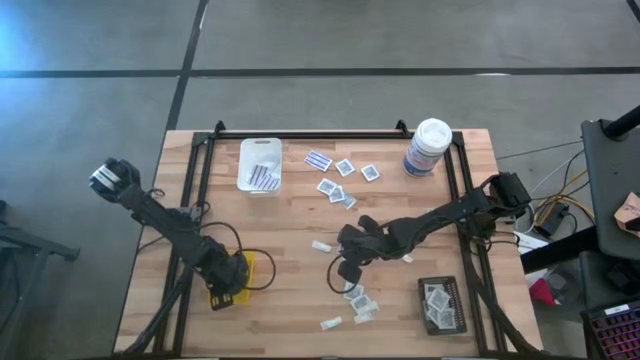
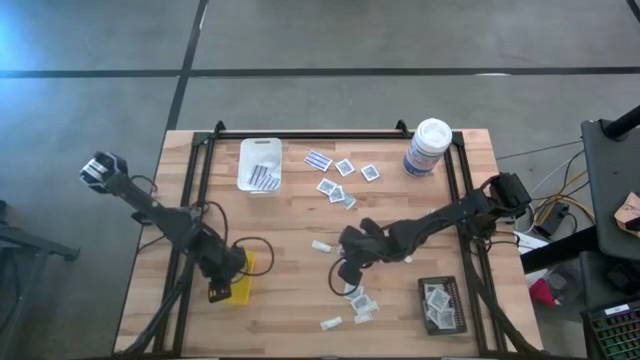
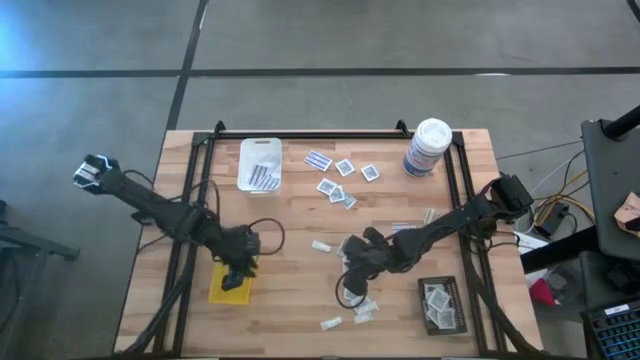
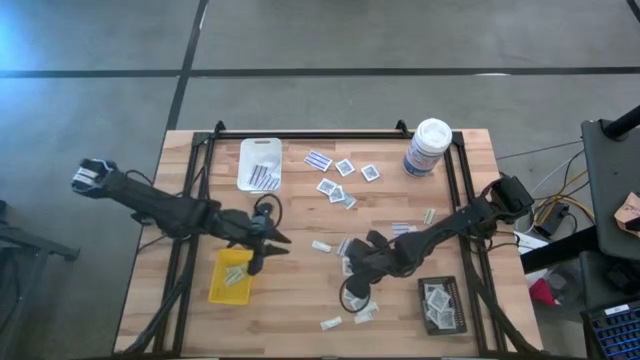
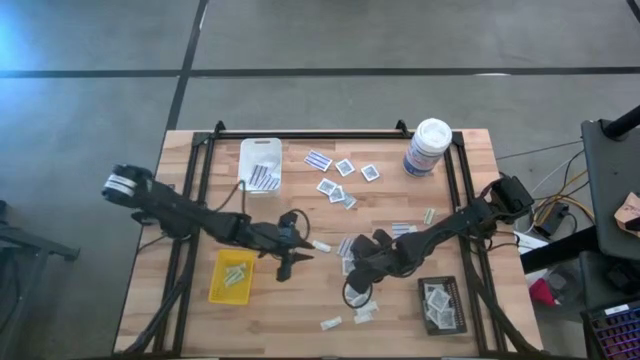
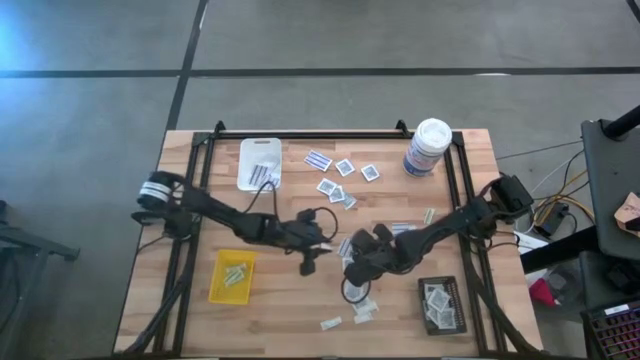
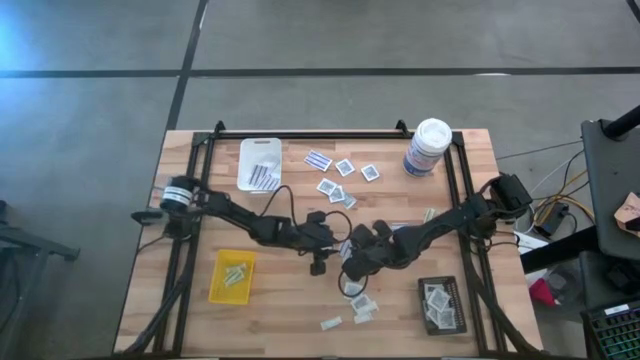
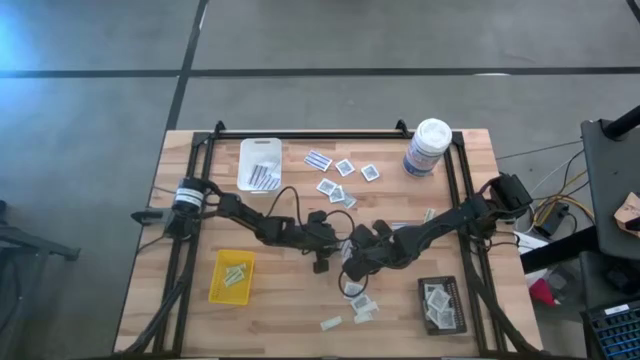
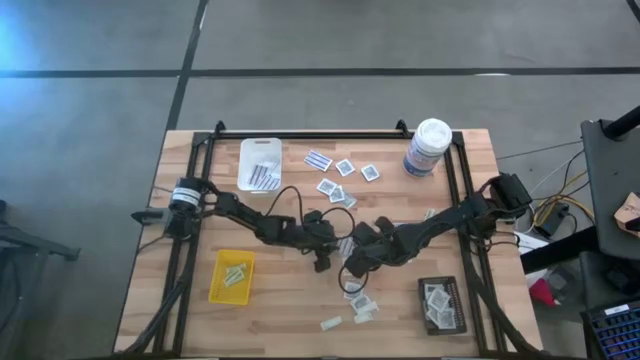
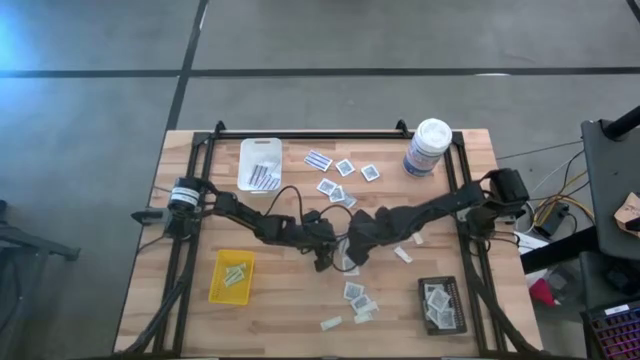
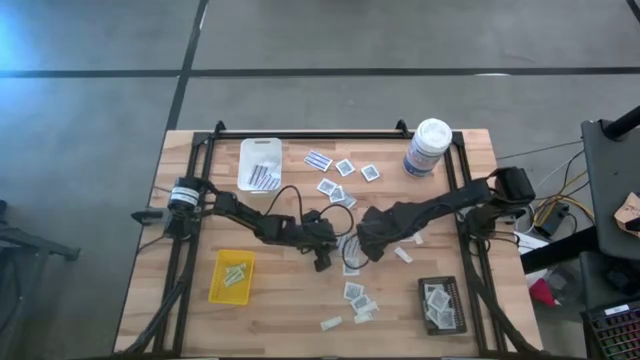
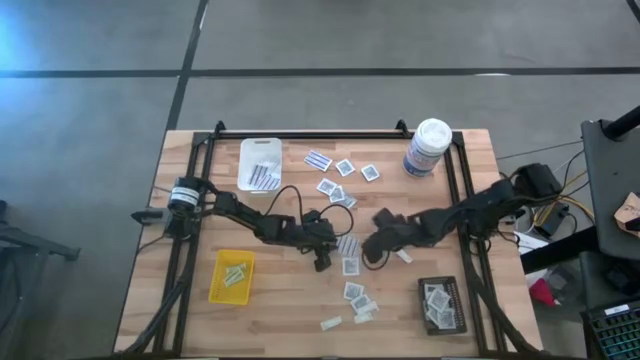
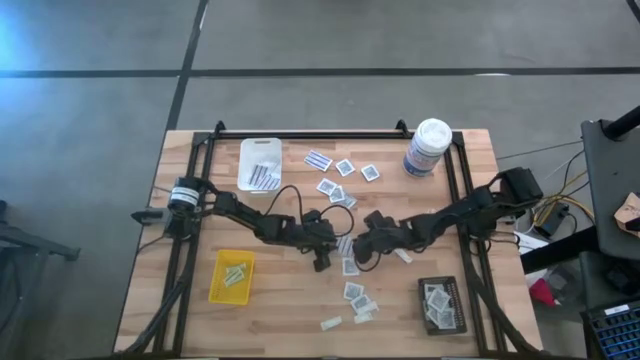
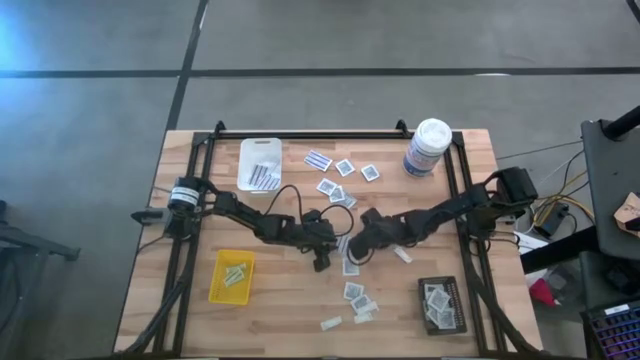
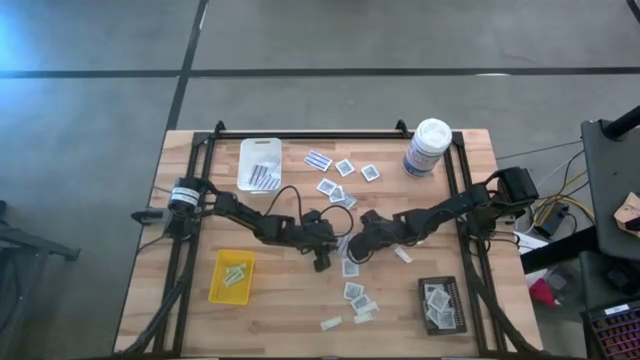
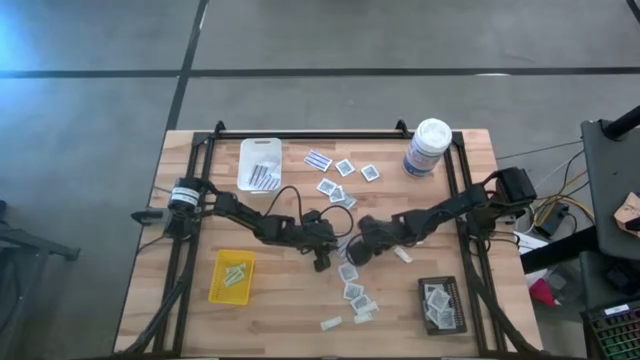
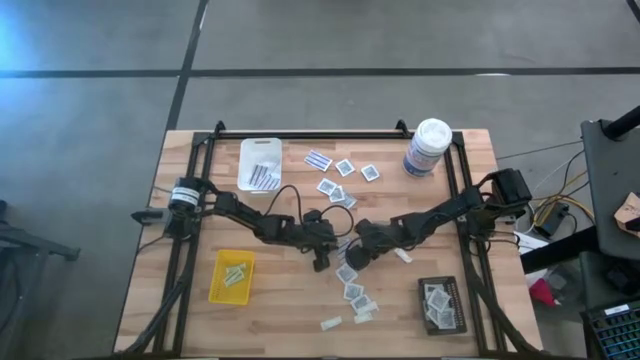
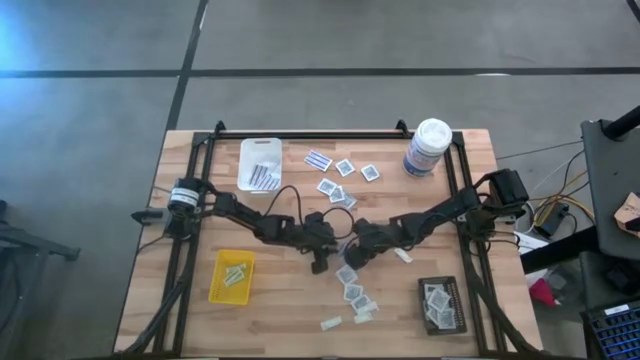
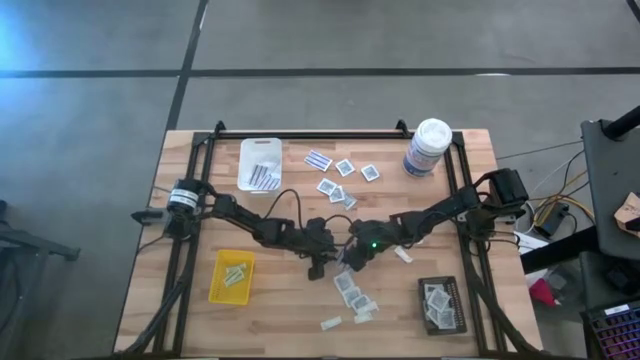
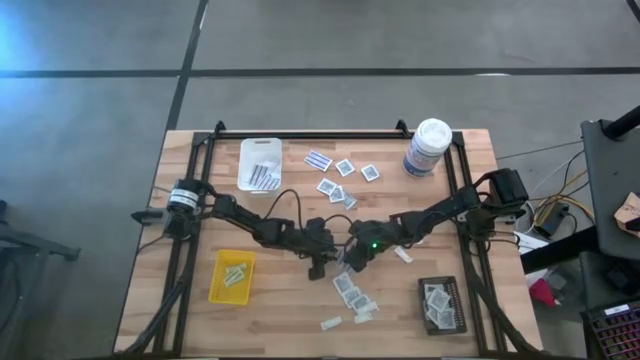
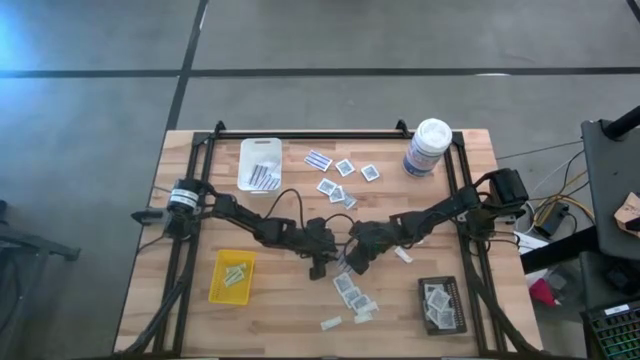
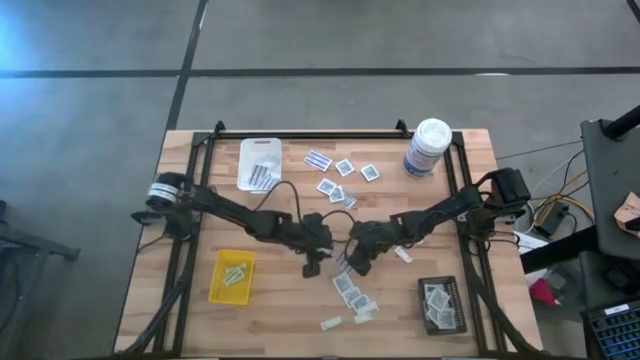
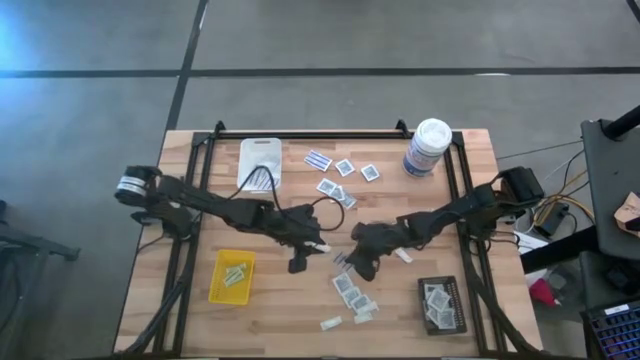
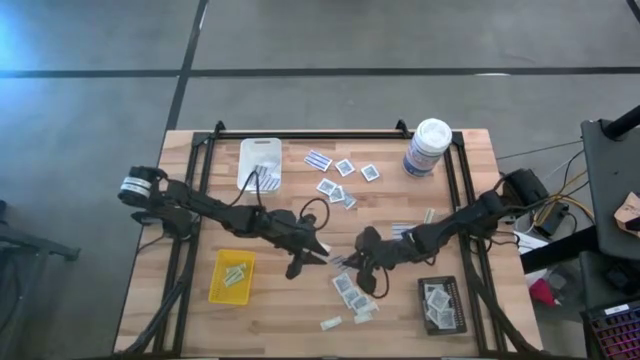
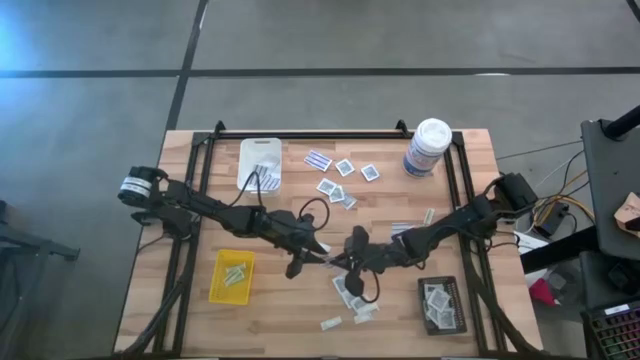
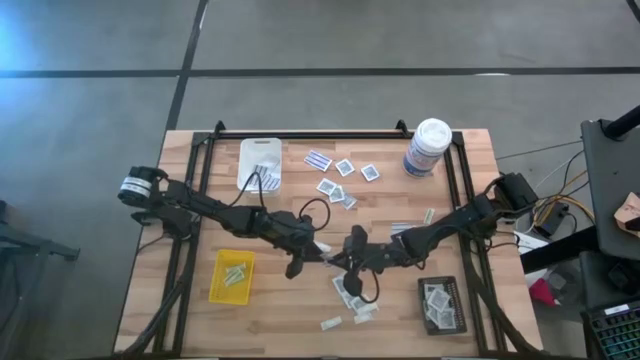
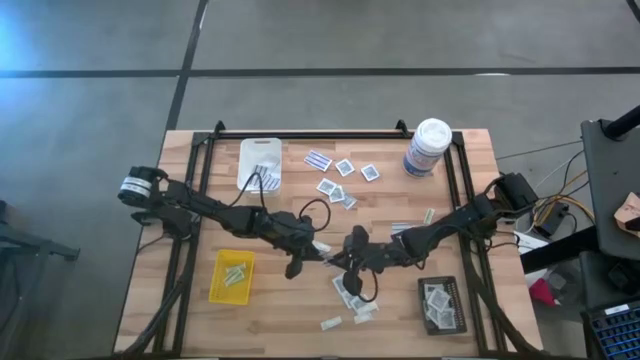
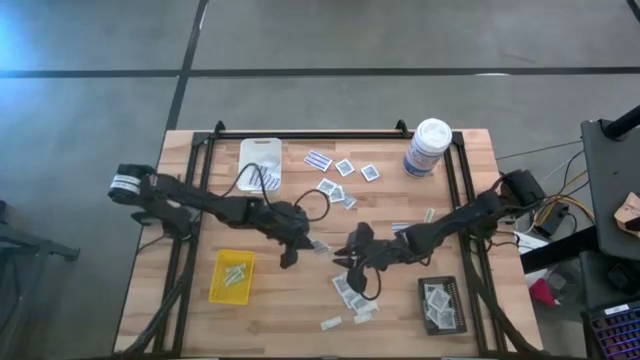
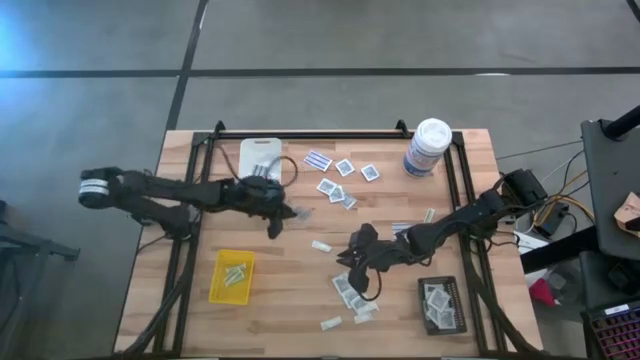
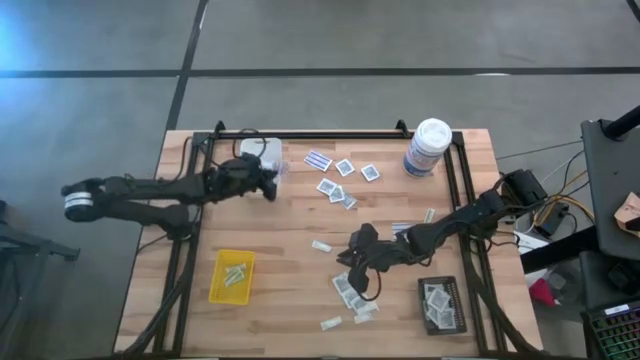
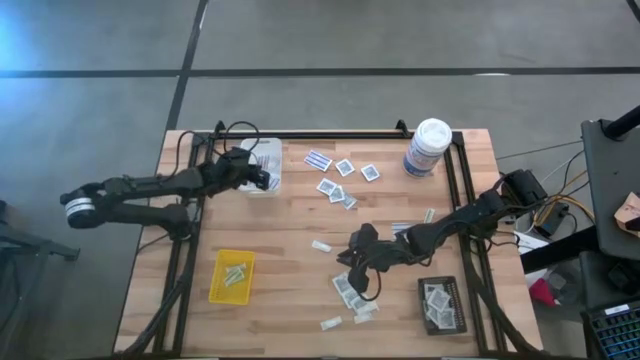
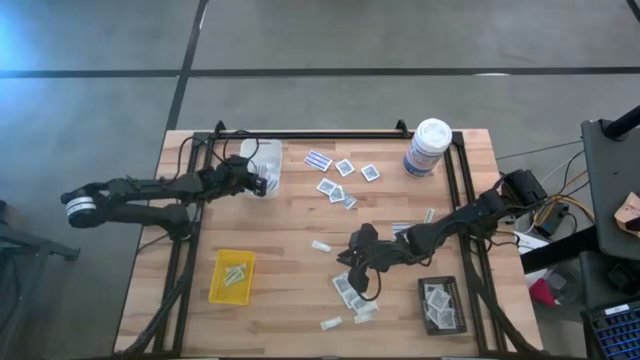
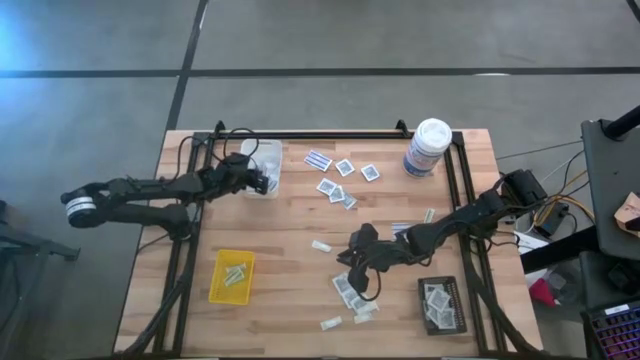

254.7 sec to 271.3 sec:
Task: Pick & Place First Aid Supplies
Put the blue bandage into the white bin

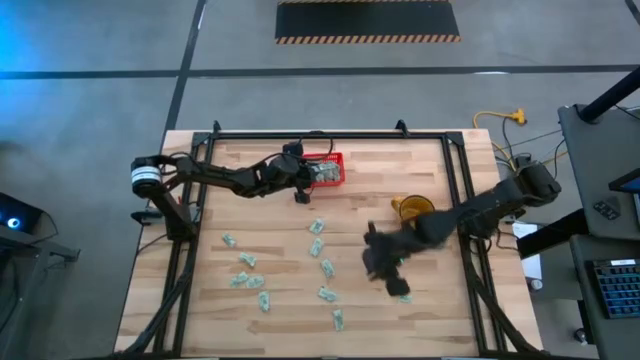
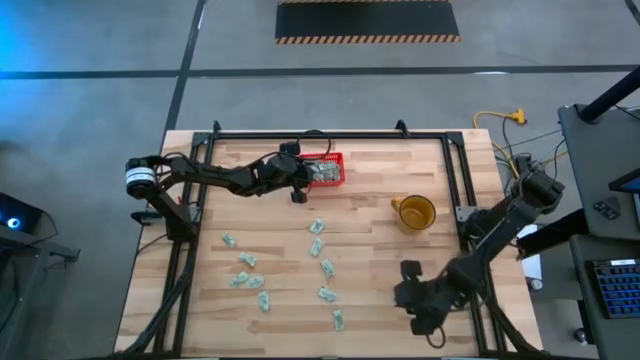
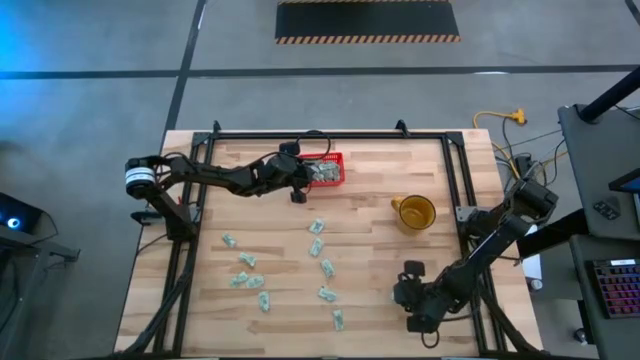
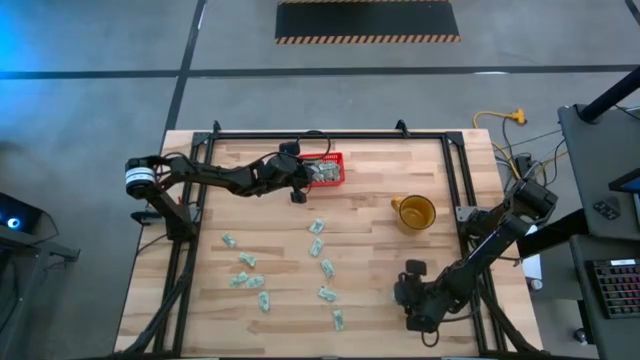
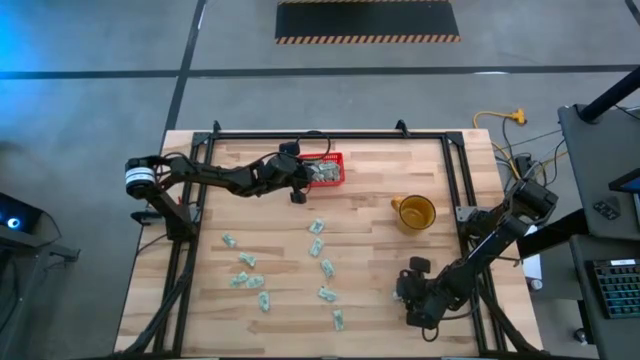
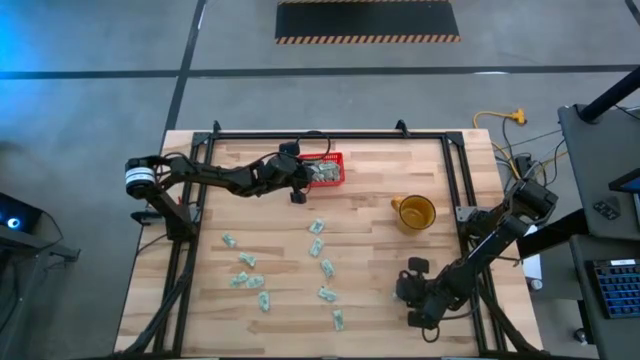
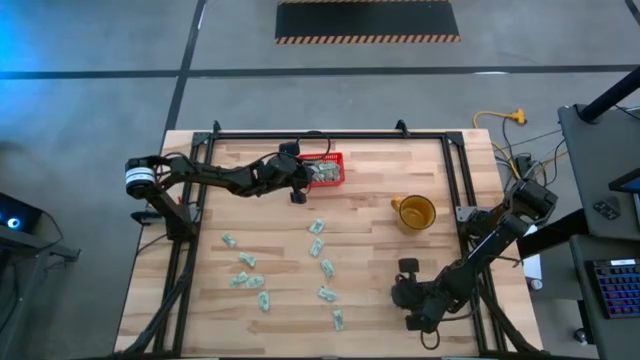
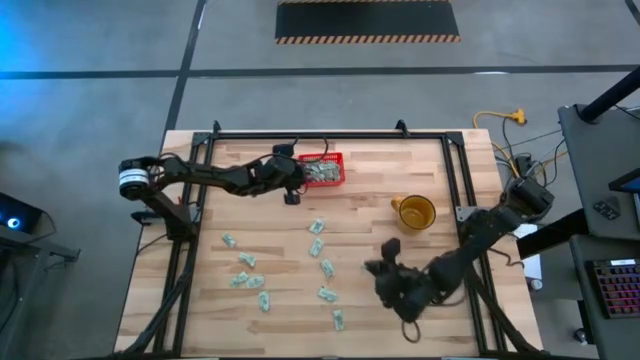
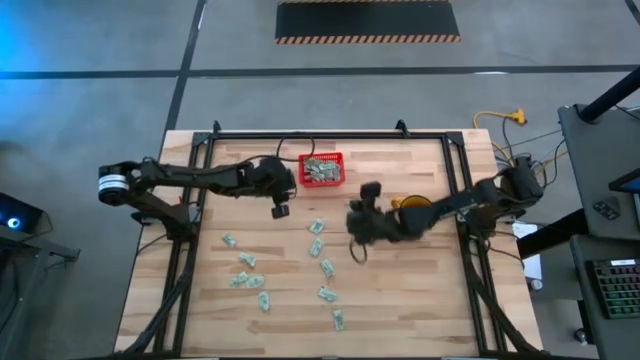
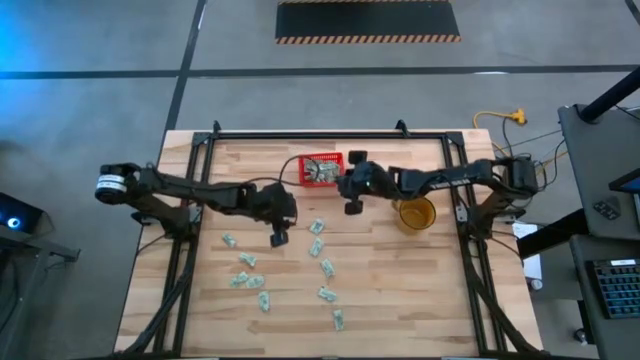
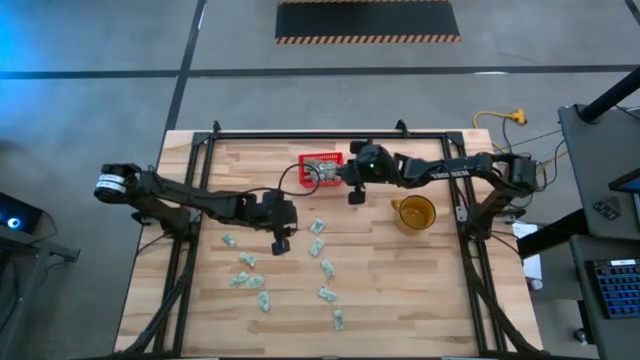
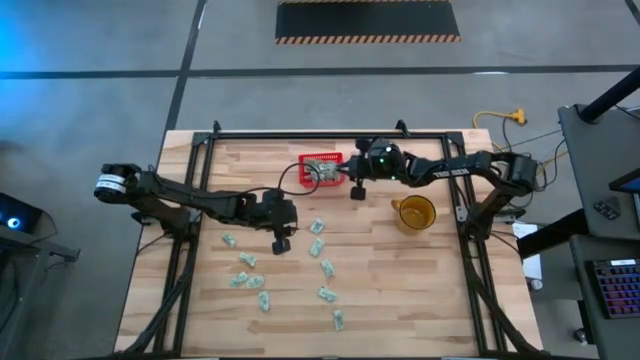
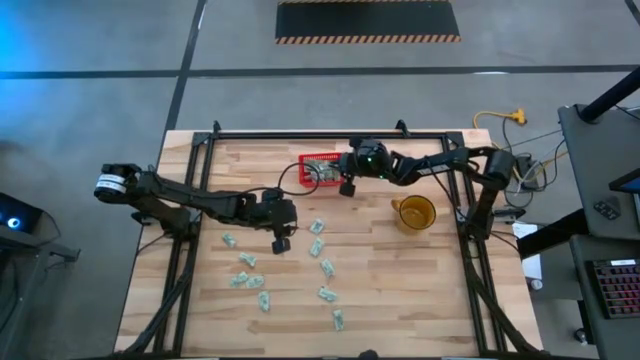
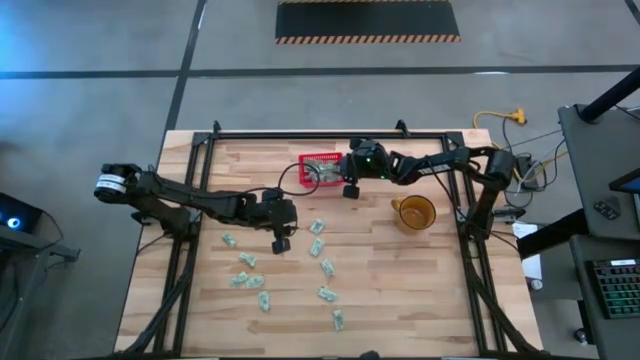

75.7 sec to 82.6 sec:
Task: Pick and place Stevia / Truvia into bins
Put the white stevia packet into the red bin
